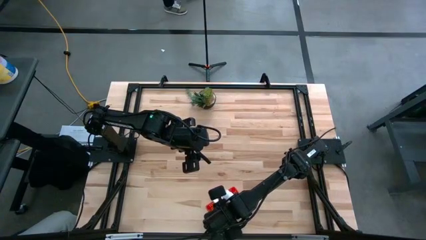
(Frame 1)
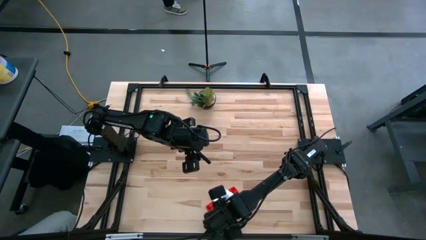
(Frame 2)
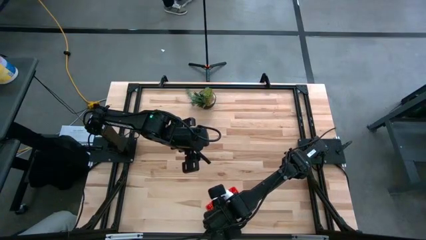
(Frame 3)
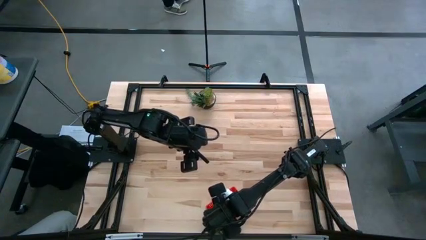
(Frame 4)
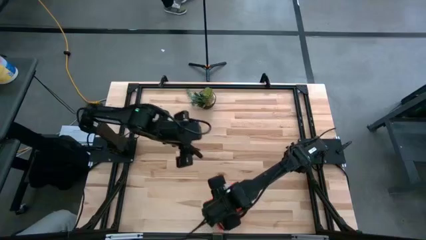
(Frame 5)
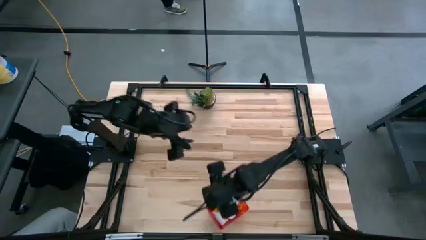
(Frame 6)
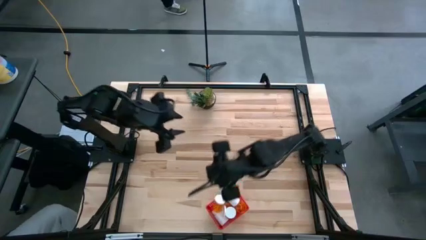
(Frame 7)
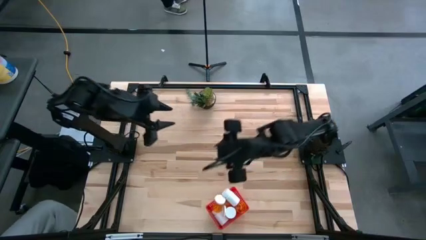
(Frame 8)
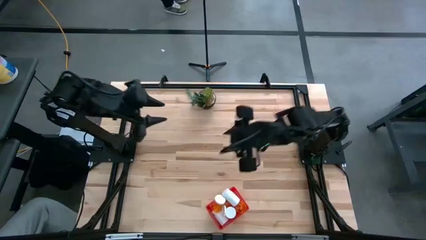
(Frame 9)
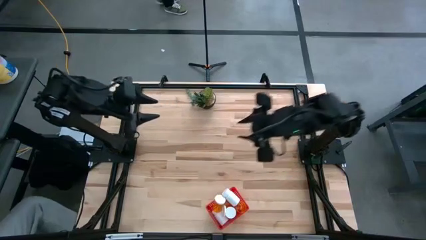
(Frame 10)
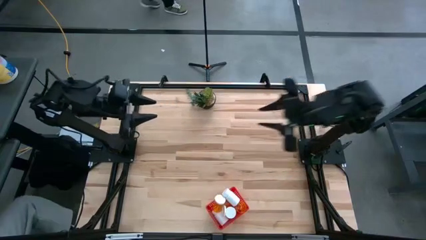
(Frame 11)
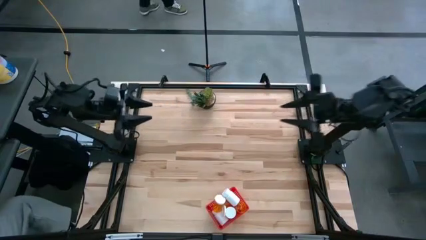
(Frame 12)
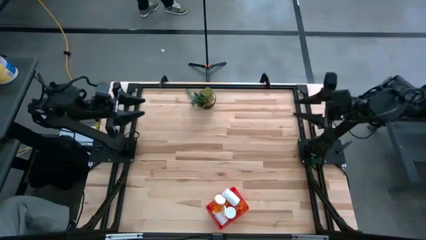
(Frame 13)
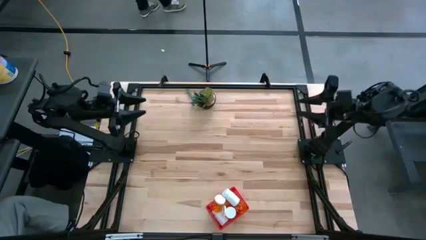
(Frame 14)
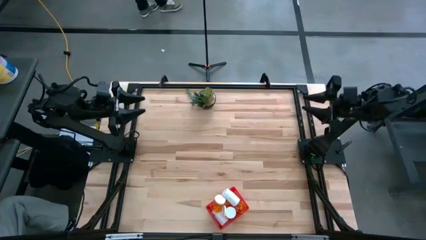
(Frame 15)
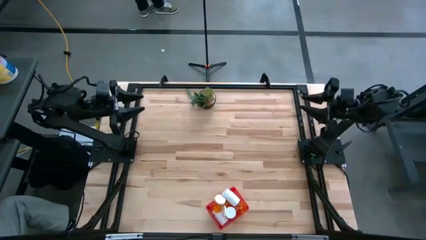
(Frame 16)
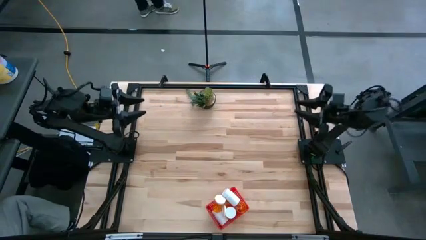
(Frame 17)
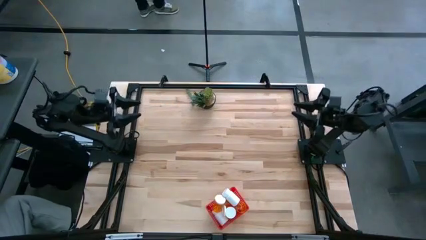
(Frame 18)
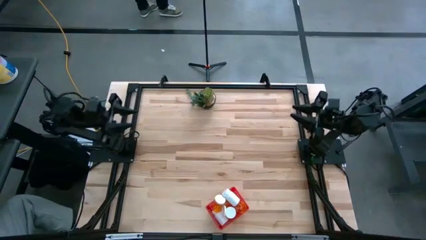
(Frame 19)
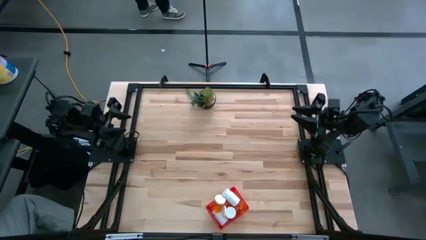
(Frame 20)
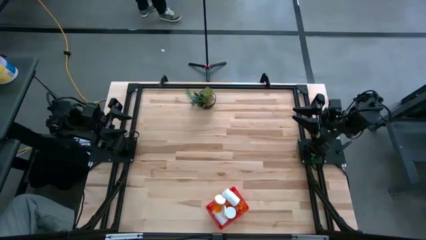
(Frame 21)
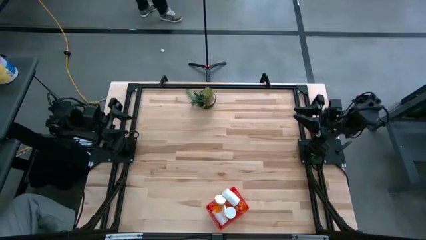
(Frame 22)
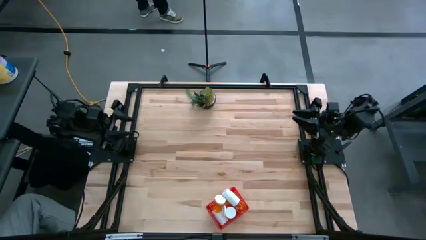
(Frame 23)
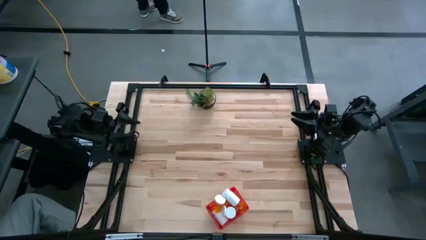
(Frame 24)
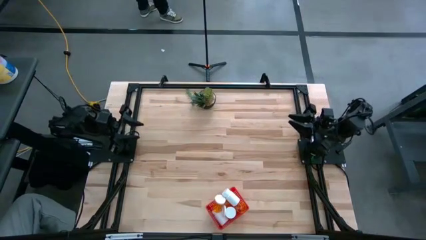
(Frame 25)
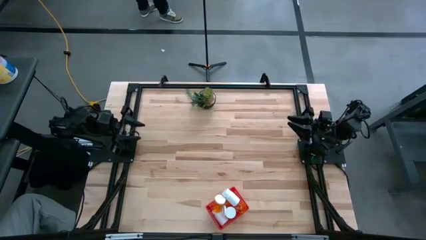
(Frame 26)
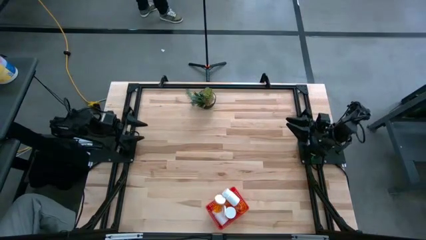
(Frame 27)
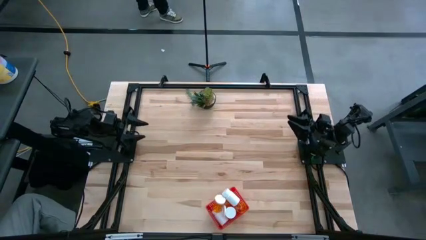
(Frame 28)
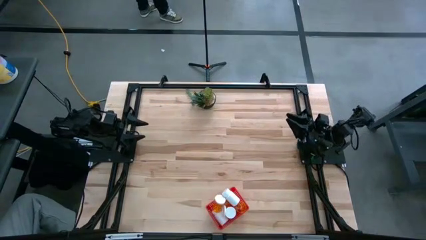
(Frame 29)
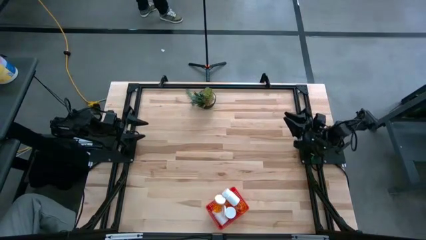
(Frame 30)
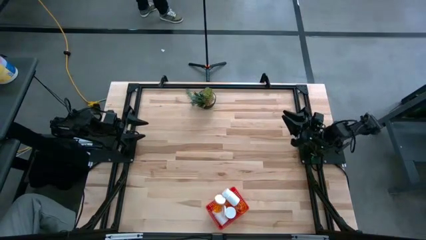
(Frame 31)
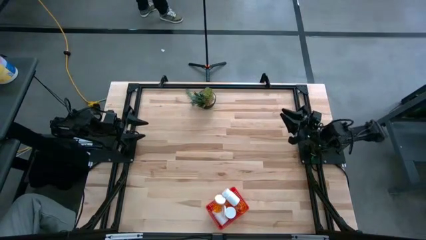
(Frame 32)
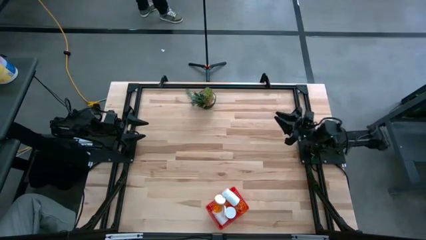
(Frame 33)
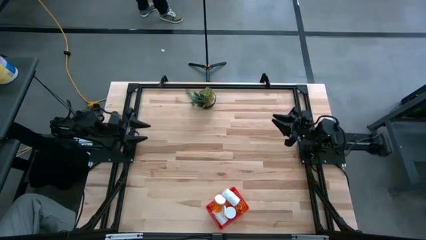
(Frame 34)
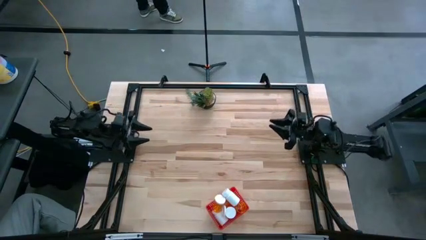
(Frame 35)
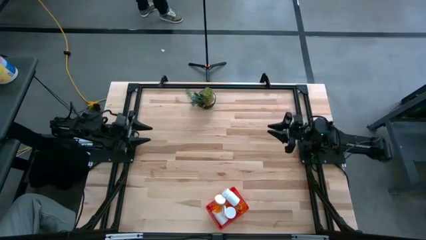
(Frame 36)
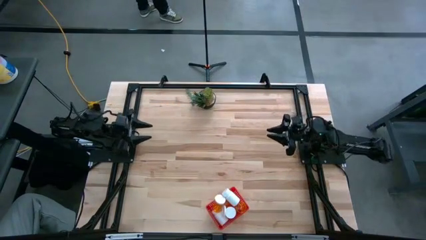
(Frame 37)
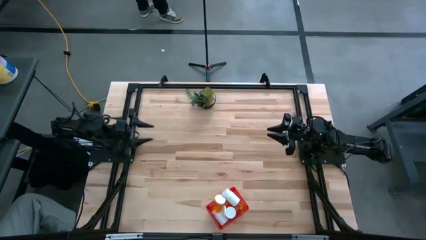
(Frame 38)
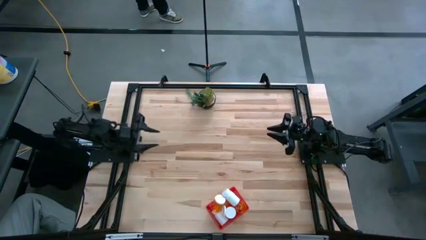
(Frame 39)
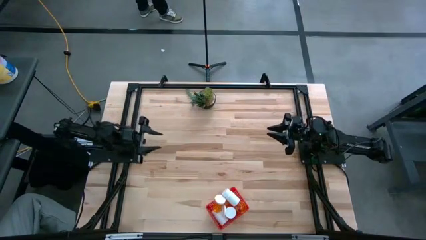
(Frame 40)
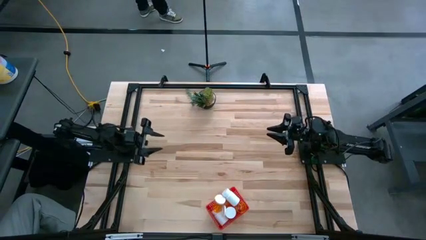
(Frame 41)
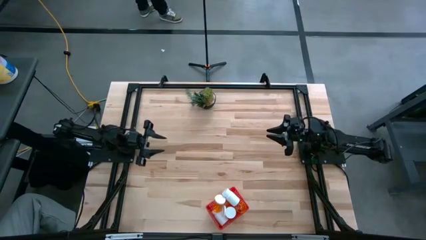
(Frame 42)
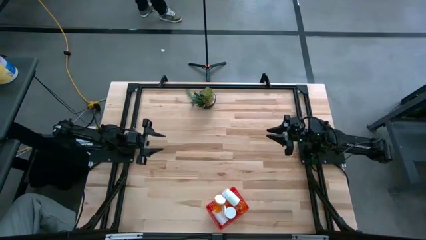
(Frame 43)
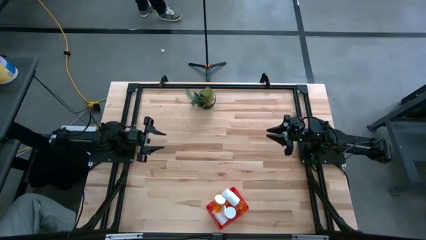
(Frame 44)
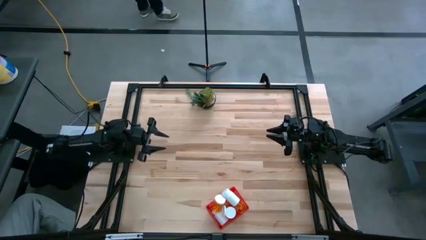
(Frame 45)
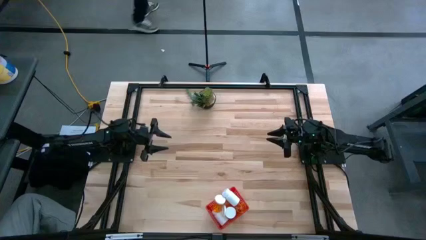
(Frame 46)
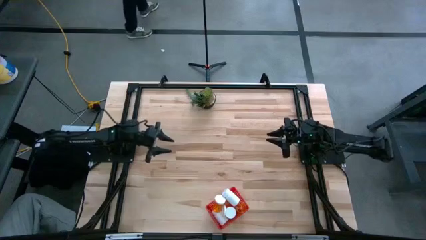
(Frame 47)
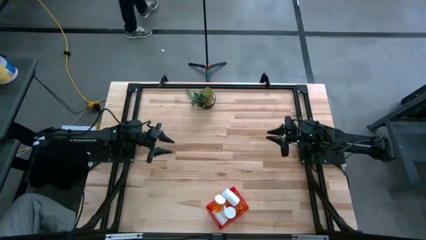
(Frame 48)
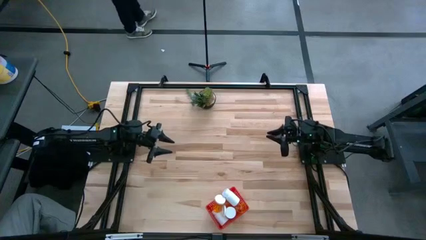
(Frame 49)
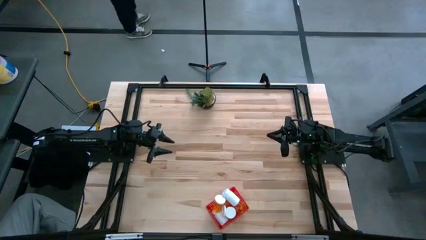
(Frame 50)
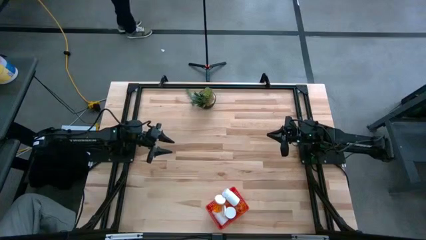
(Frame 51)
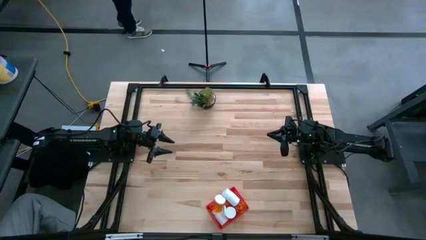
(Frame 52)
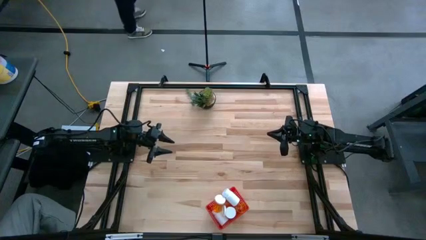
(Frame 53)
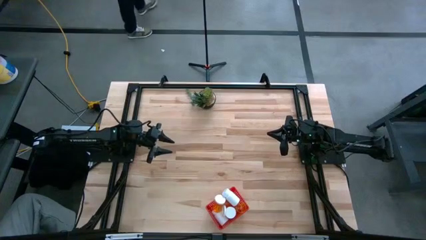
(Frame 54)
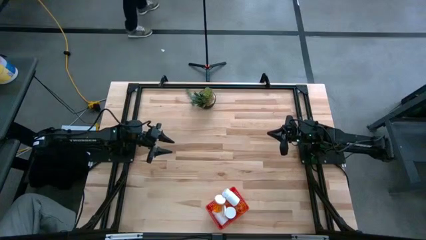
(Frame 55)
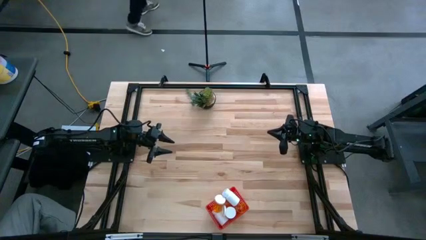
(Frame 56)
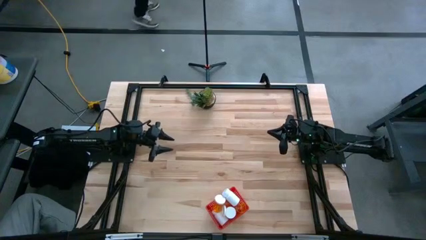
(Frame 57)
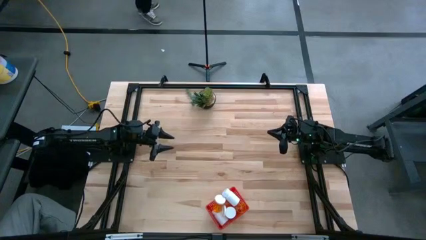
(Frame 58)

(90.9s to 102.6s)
Task: Pick and place pill bottles into a basket
Return to Home Position

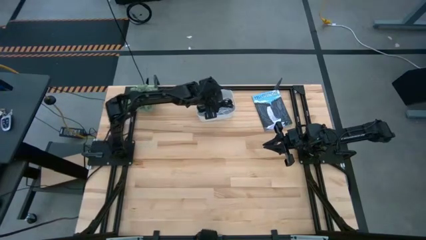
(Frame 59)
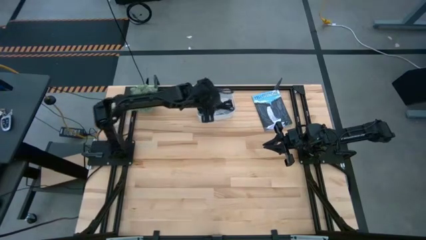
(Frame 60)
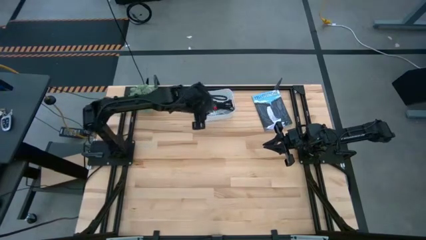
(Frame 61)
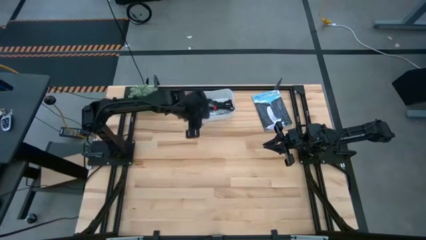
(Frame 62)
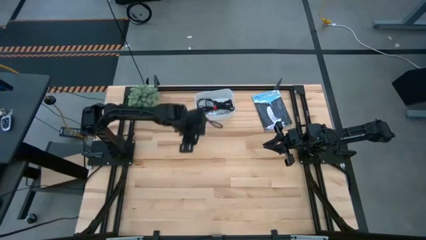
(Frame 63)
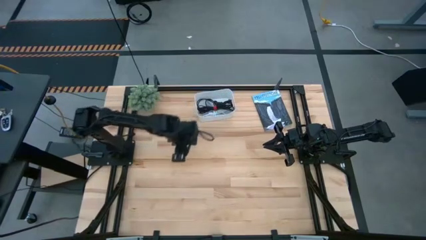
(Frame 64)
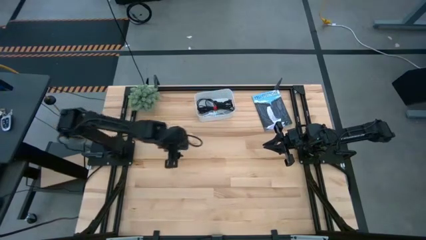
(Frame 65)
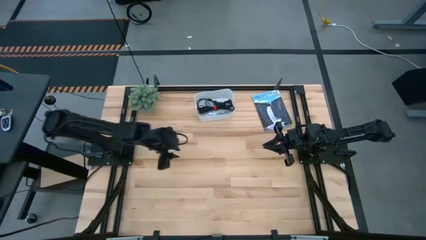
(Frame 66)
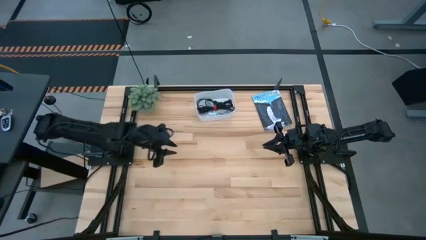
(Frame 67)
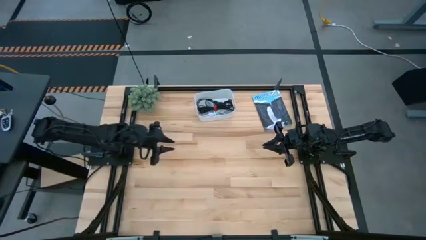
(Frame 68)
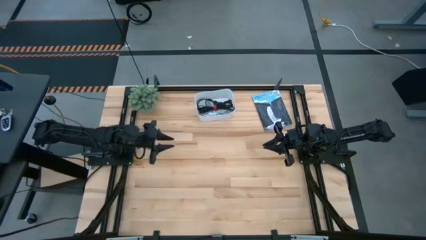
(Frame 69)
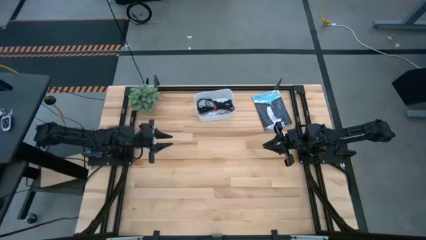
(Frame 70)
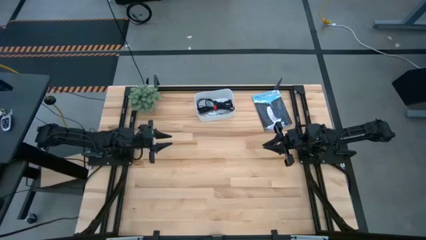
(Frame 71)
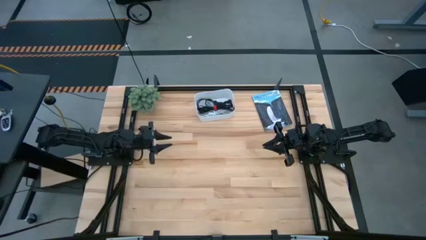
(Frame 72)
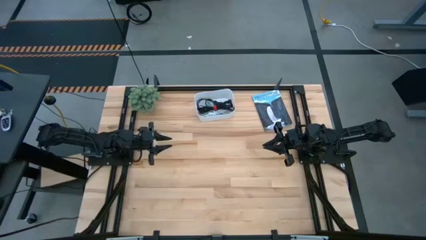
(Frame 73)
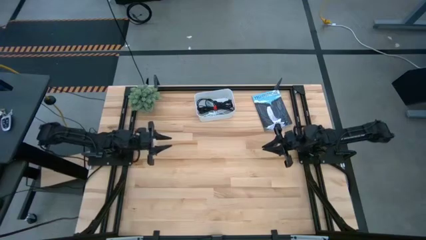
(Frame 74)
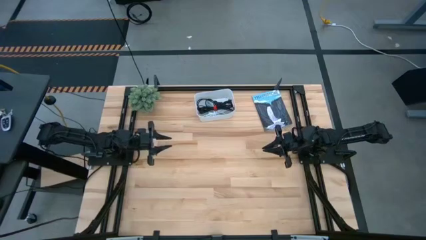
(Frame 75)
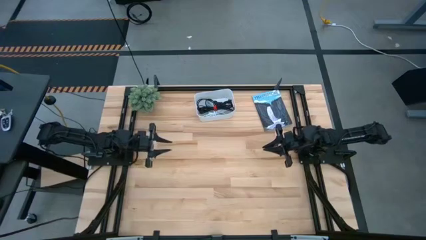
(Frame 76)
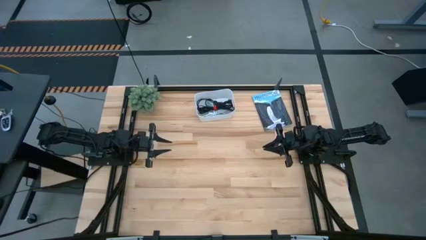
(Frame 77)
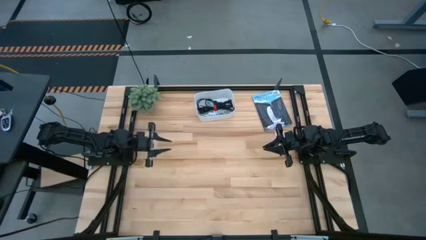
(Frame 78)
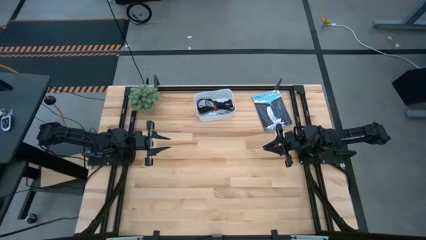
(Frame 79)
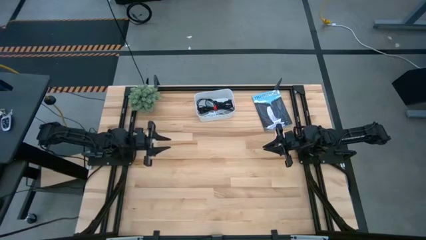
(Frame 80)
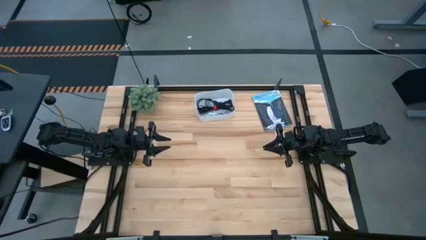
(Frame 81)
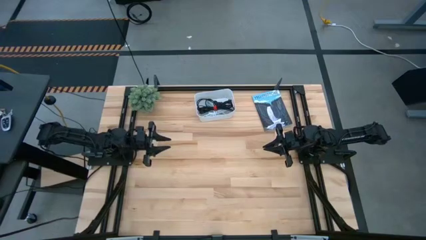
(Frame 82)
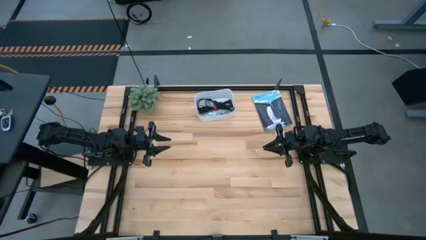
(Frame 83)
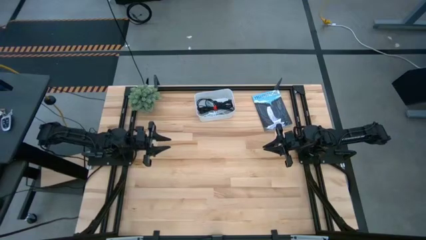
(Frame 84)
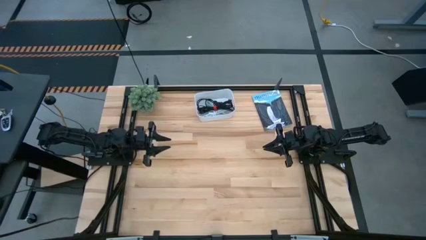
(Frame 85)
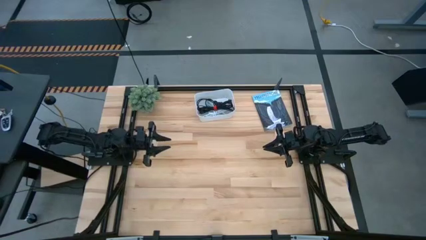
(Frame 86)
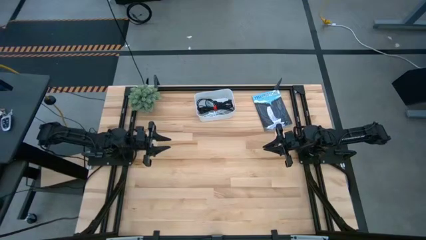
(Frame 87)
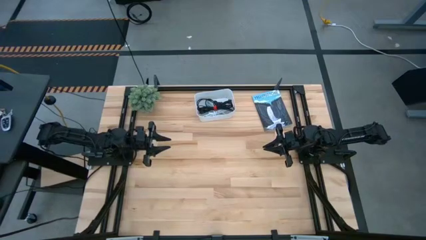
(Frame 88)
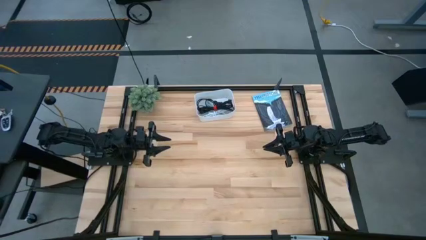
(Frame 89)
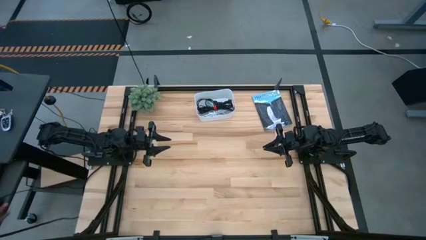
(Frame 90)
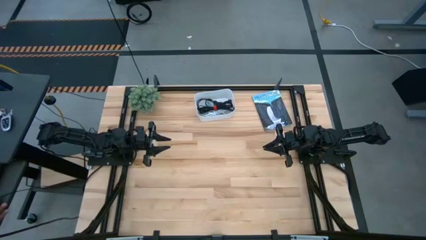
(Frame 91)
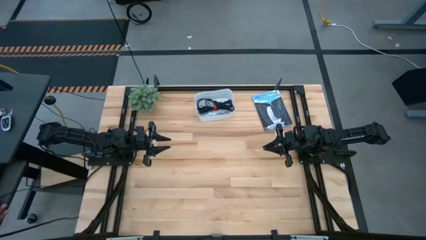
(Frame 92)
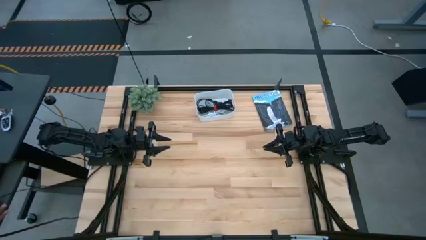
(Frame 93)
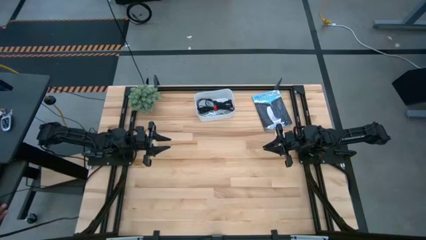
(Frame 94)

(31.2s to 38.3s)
Task: Pick and place USB-C Cables
Return to Home Position
